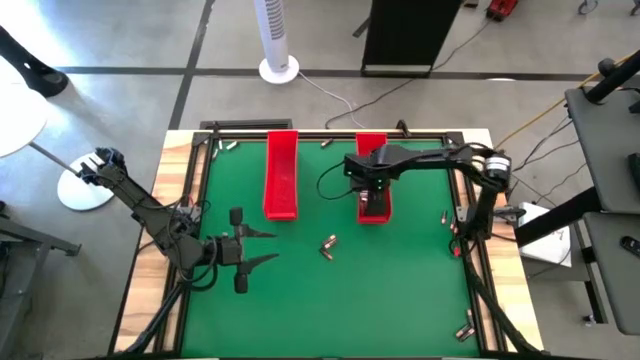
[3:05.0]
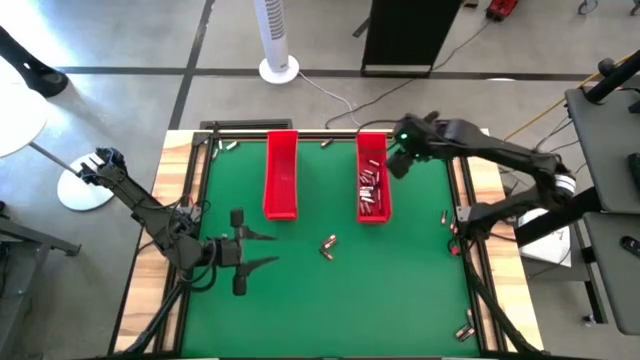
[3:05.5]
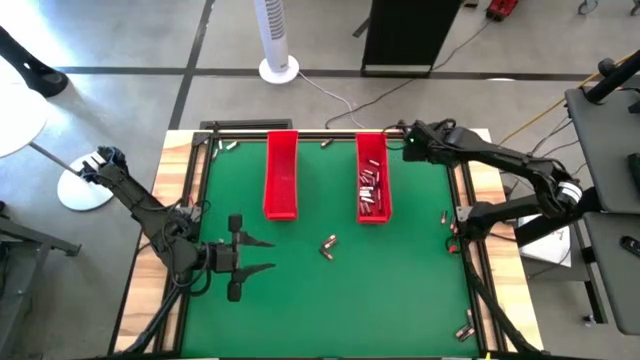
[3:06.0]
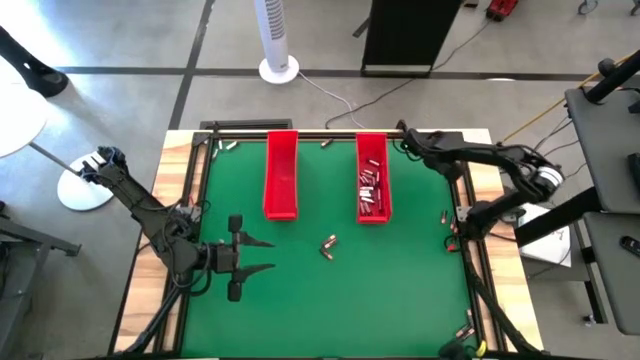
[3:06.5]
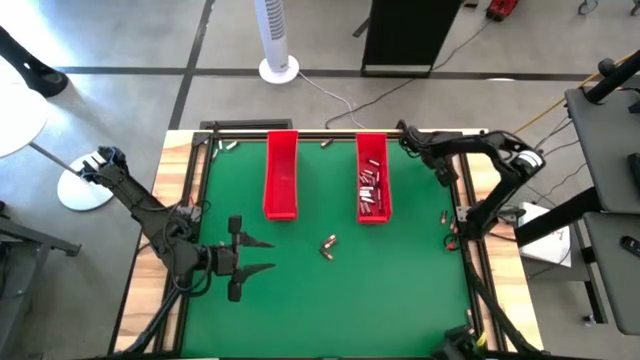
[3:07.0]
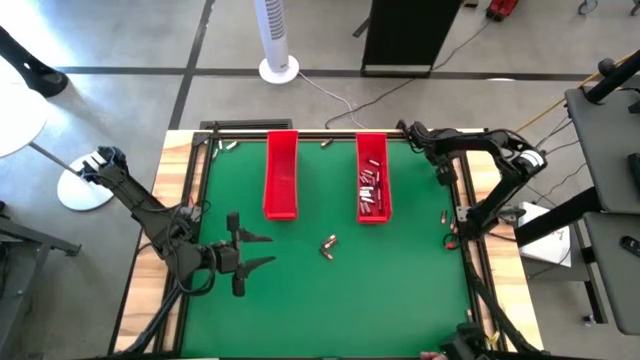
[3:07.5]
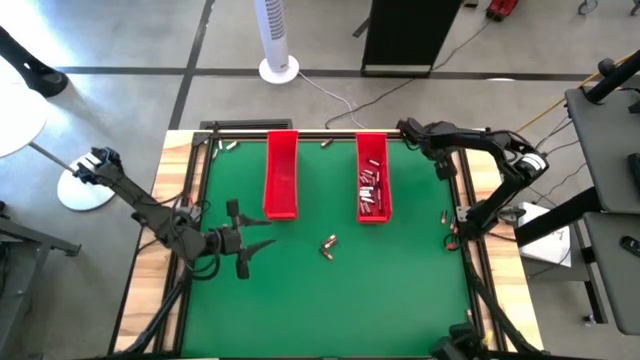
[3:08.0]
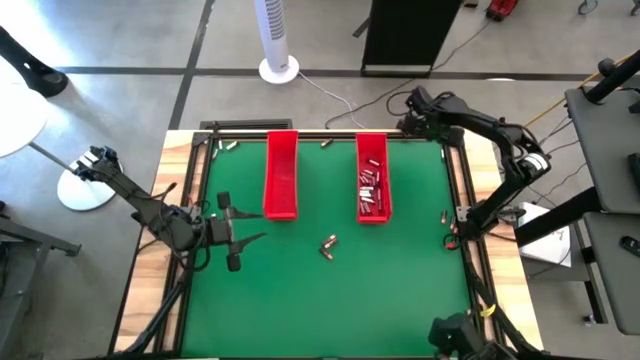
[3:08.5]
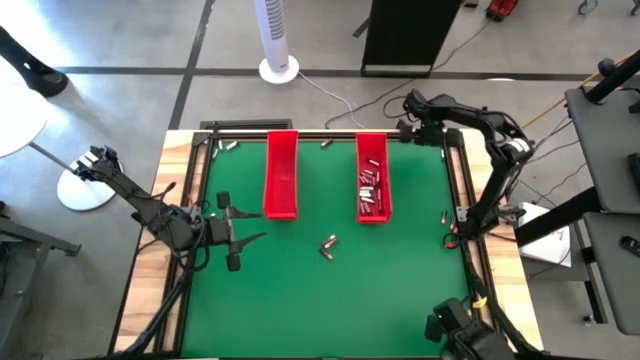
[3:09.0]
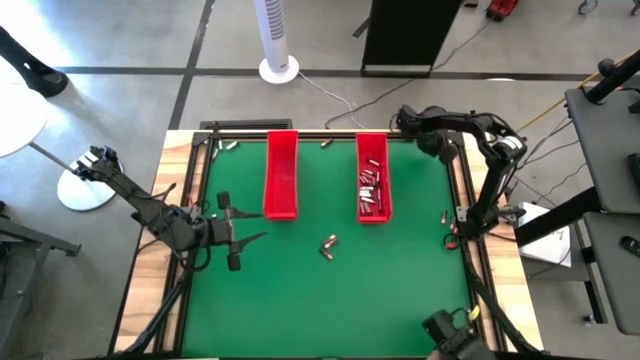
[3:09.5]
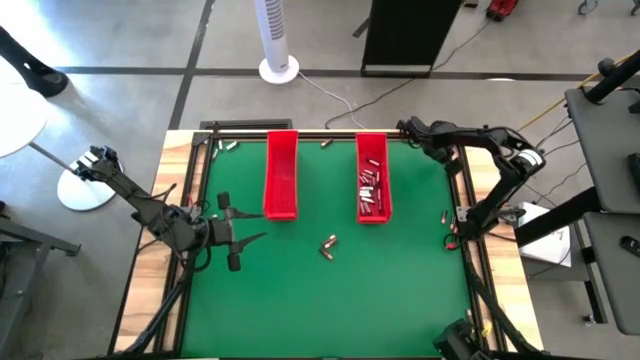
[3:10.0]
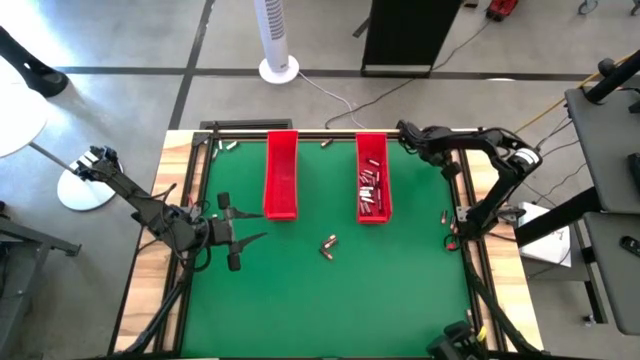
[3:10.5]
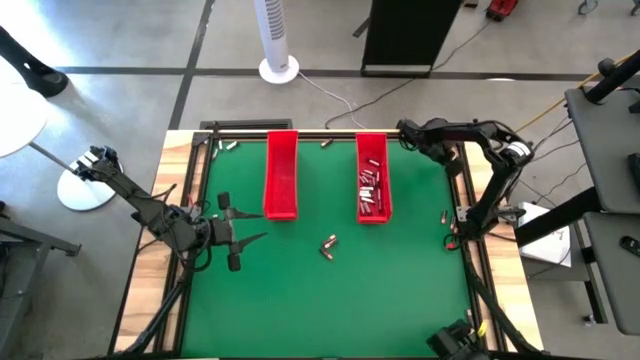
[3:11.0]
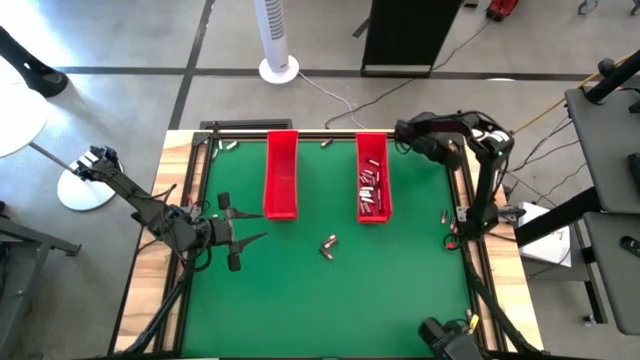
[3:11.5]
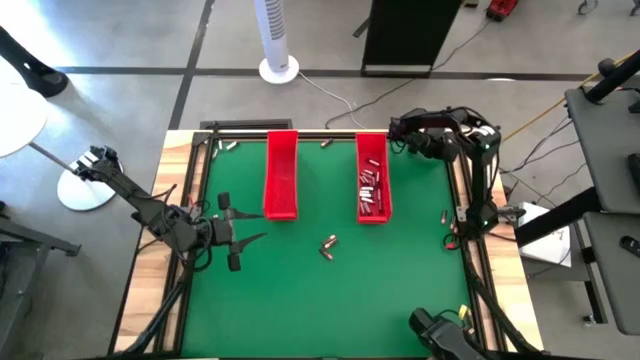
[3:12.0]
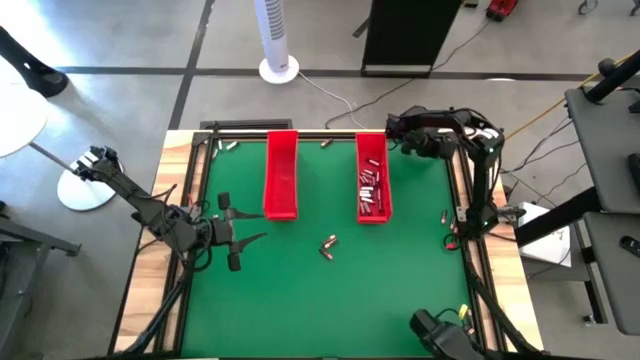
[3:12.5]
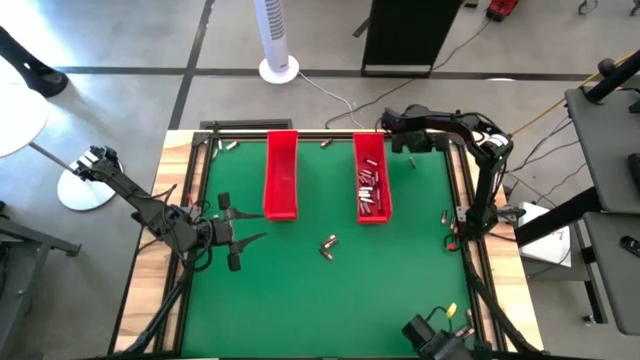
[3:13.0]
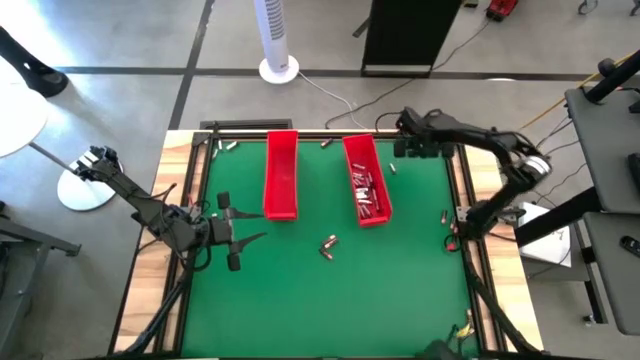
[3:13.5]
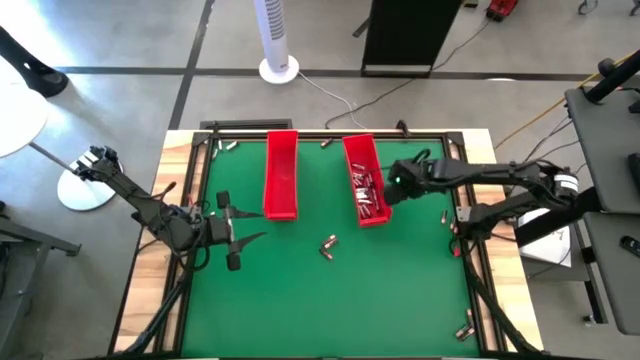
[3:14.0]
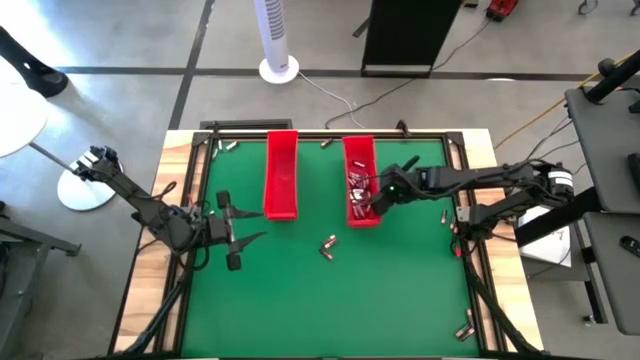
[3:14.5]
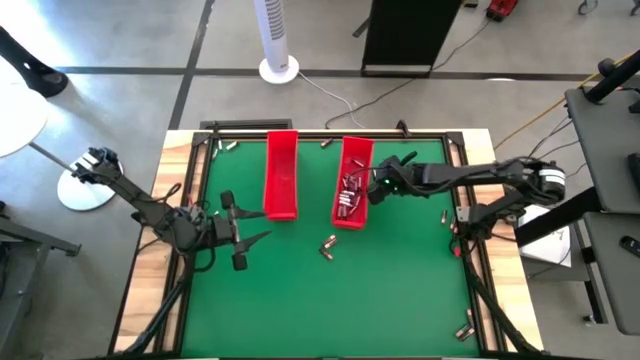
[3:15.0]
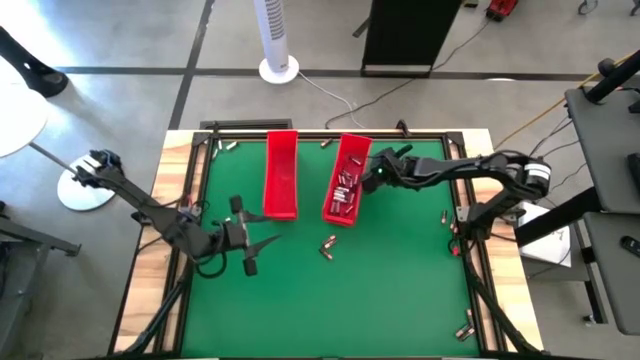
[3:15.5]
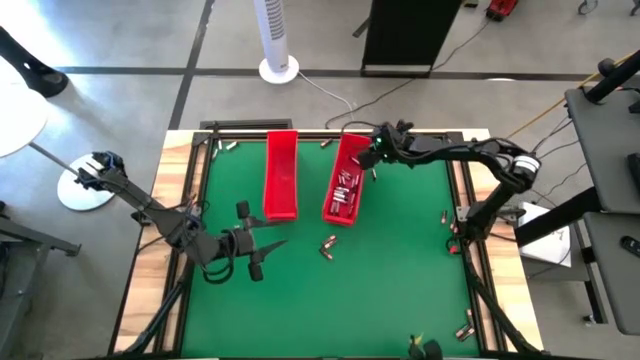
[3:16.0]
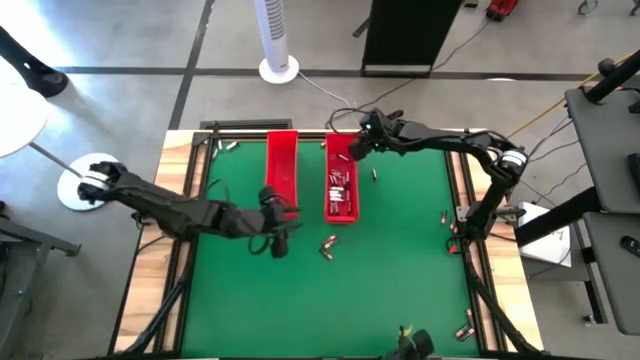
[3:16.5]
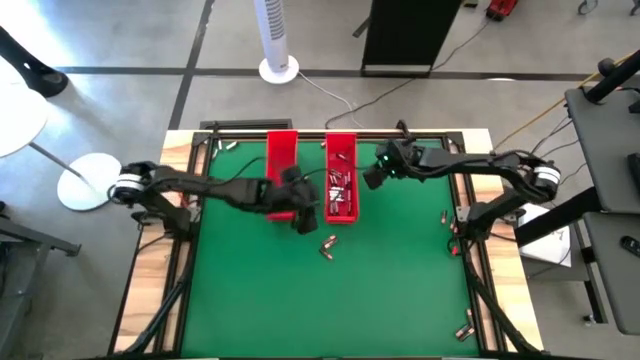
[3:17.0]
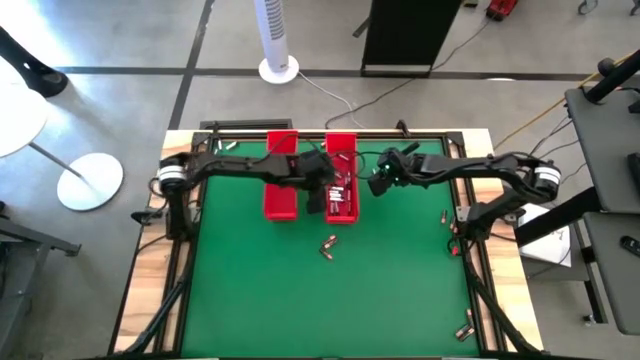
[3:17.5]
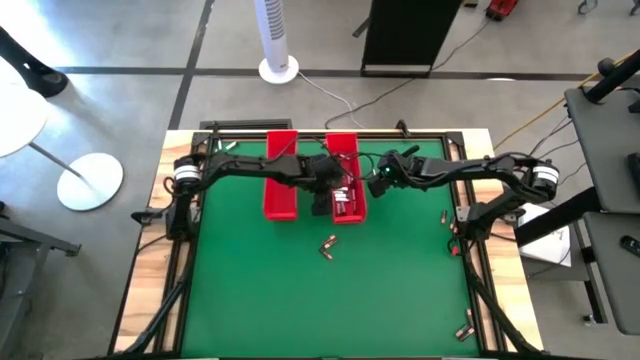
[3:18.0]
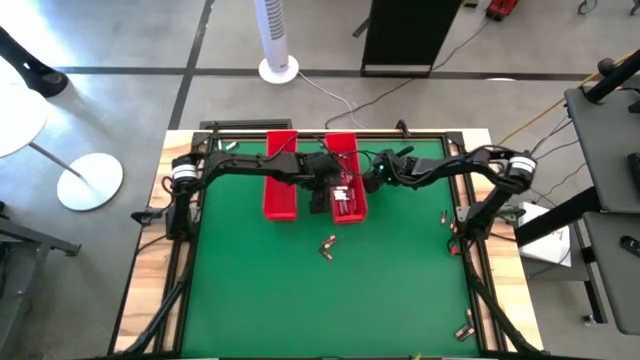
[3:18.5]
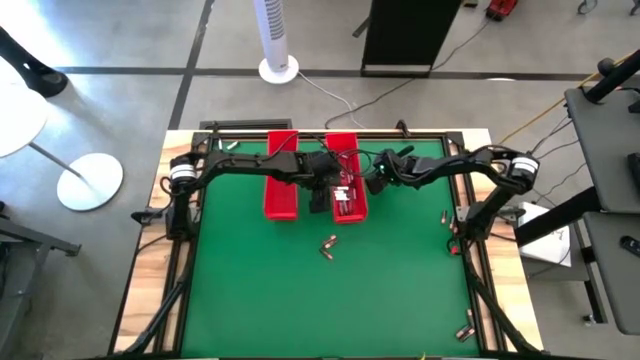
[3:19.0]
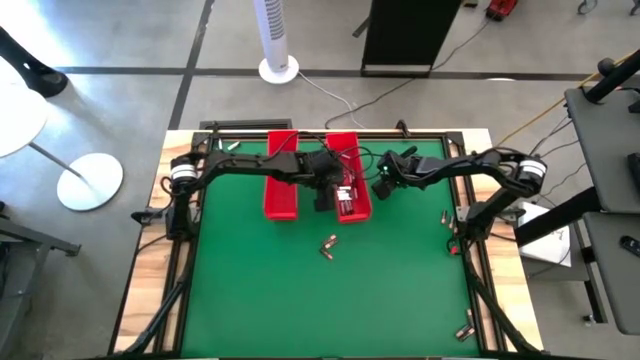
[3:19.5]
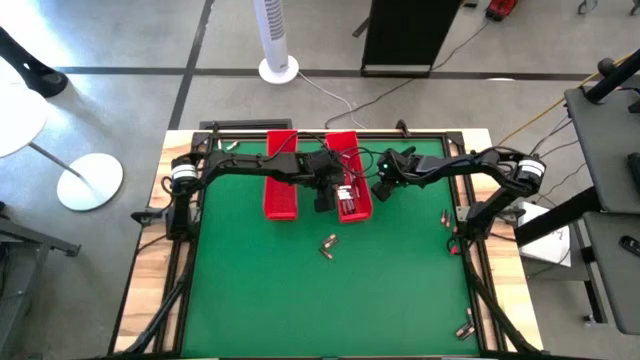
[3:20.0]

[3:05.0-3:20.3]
Task: Sort batteries
Put the silver battery into the right red bin

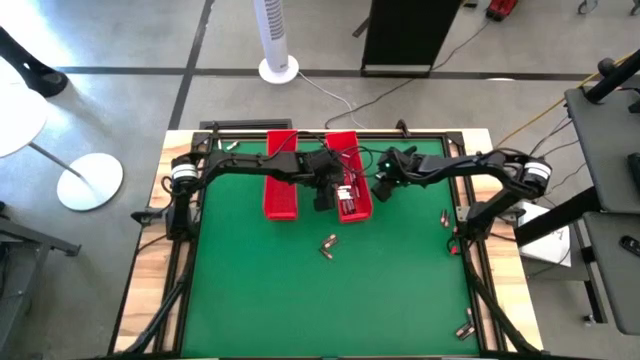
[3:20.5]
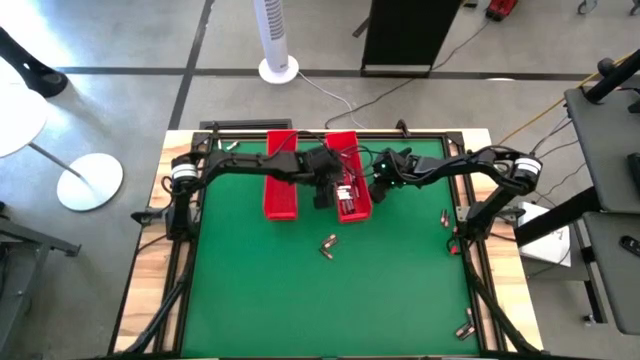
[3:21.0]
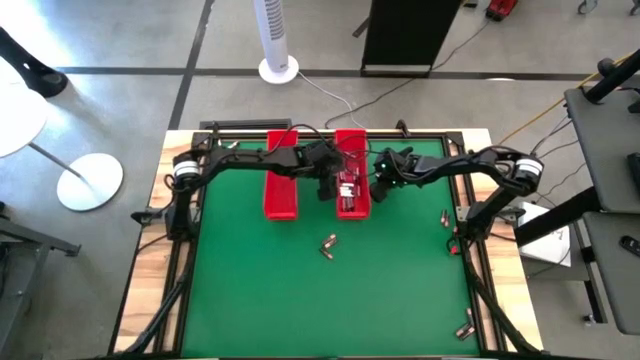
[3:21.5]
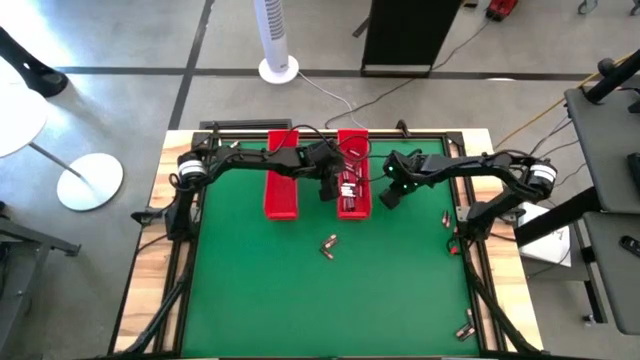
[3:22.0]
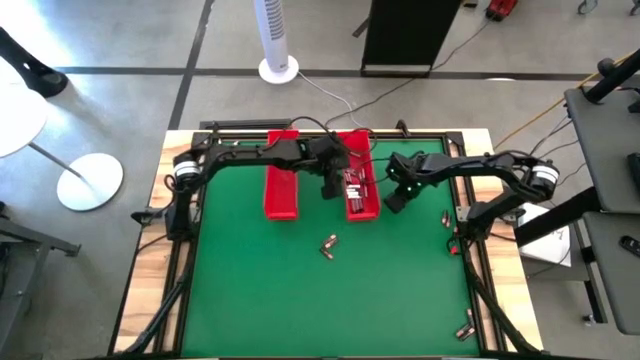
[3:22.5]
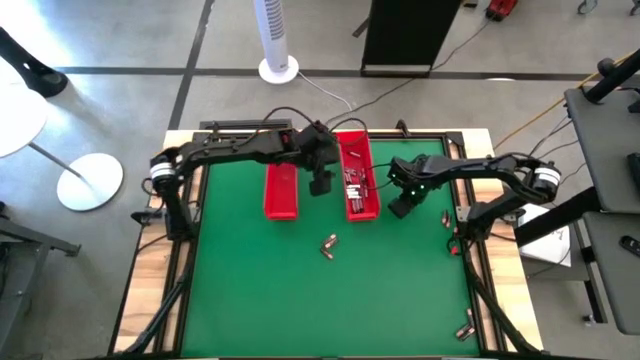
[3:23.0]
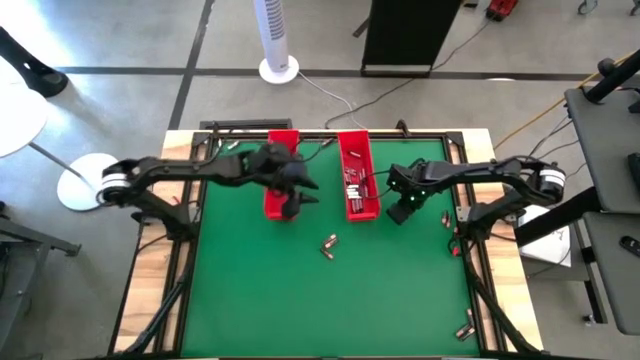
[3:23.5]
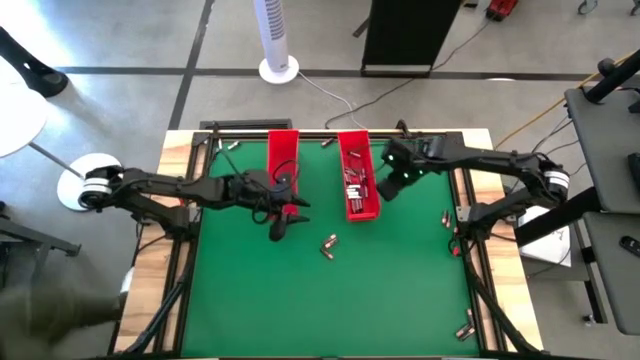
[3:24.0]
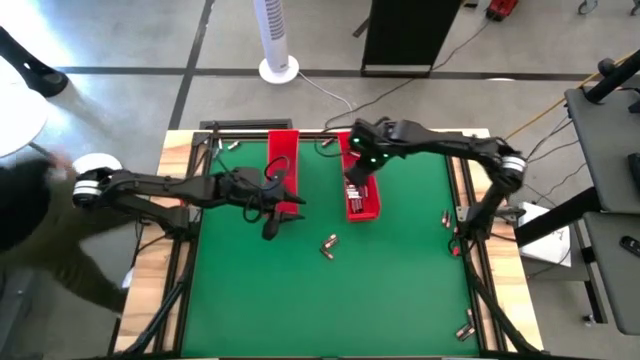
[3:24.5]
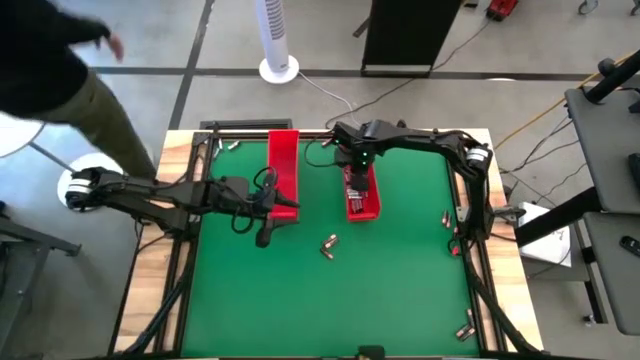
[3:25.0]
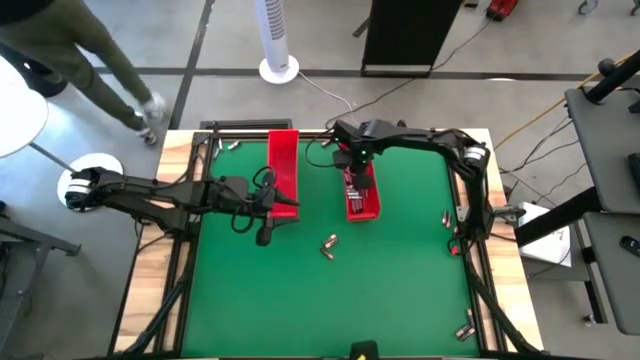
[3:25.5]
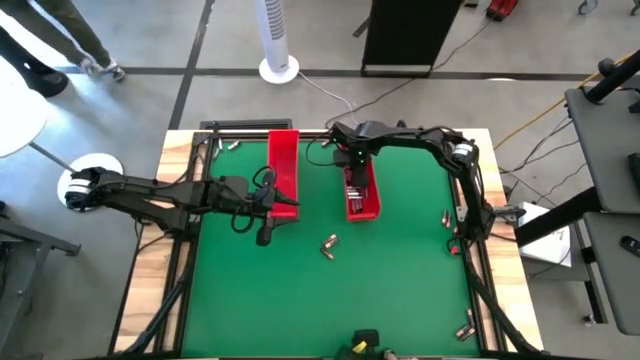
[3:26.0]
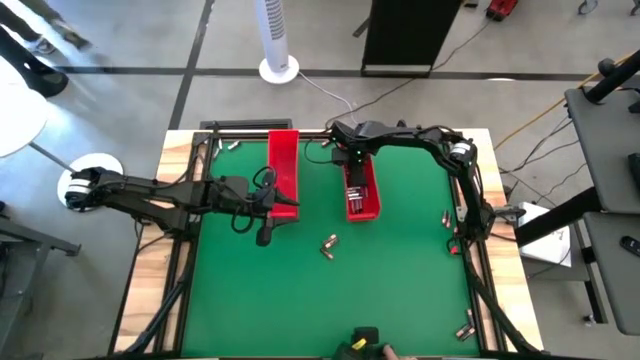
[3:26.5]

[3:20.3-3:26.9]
Put the silver battery into the right red bin
